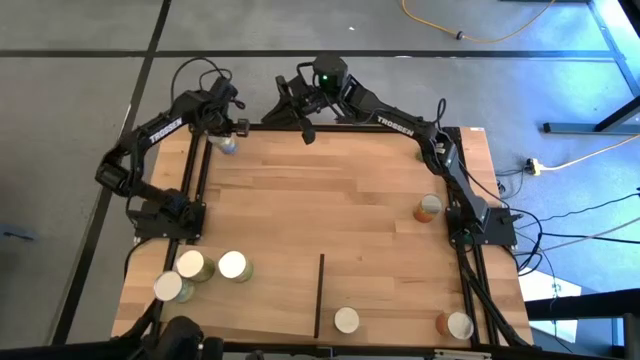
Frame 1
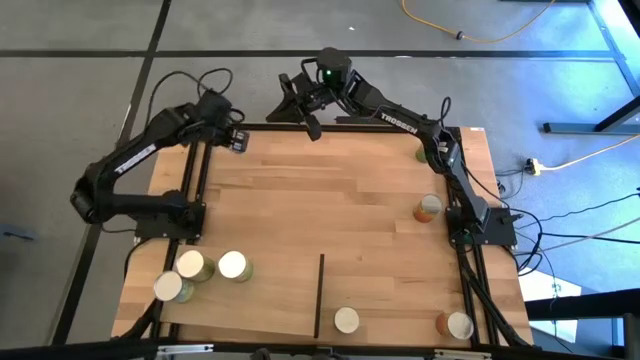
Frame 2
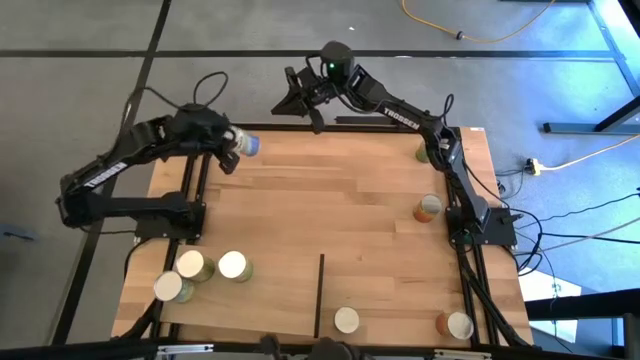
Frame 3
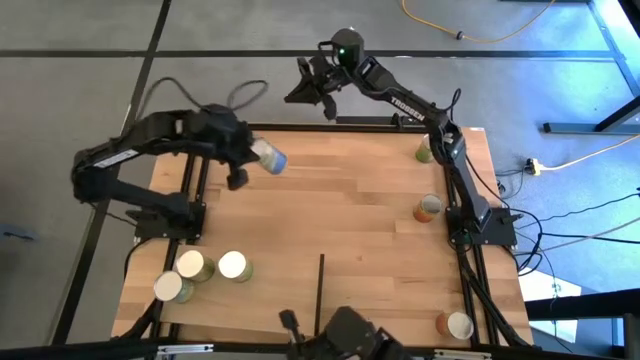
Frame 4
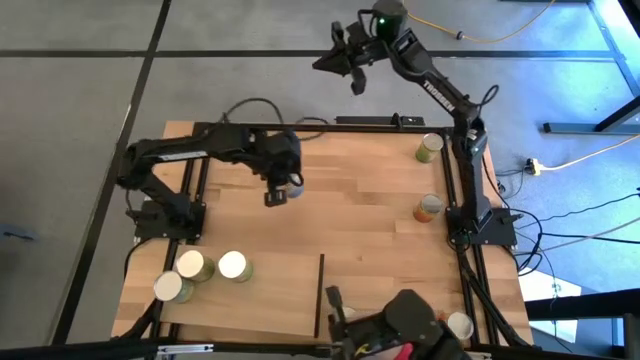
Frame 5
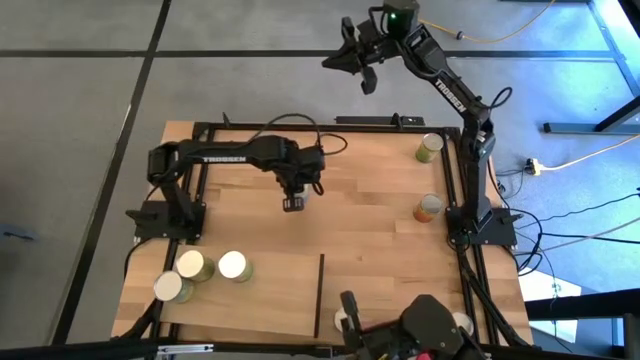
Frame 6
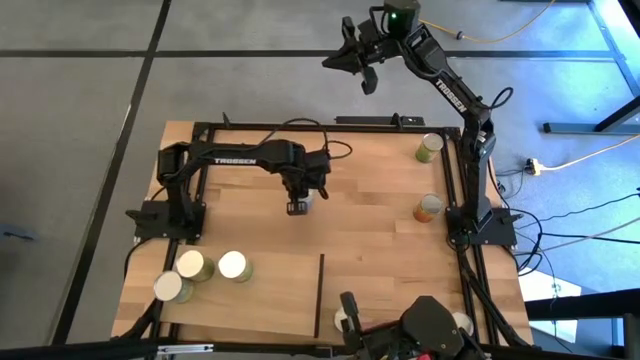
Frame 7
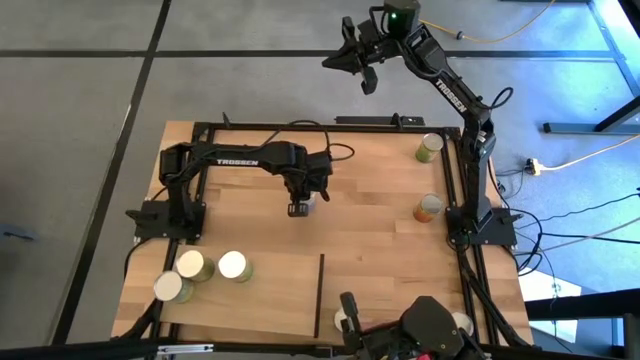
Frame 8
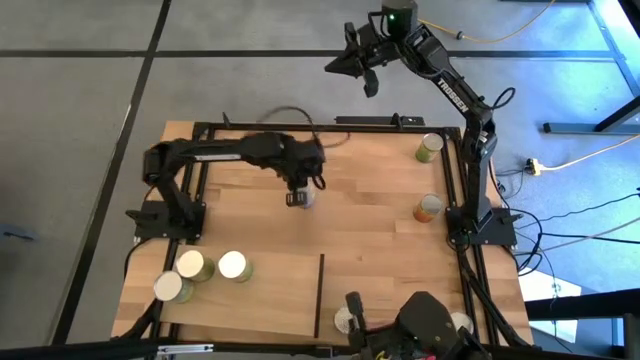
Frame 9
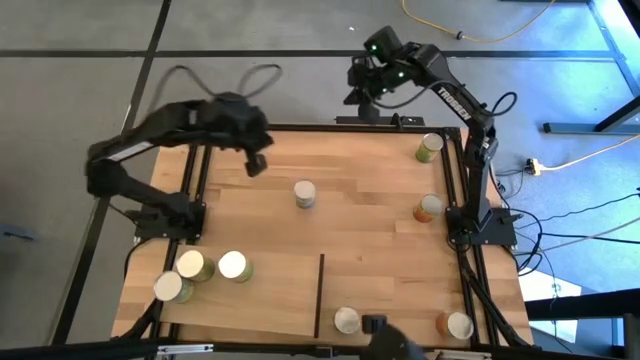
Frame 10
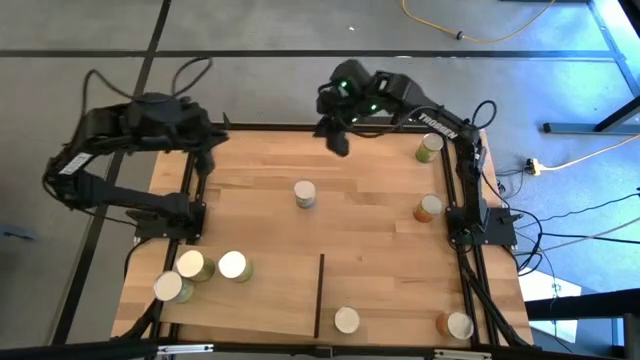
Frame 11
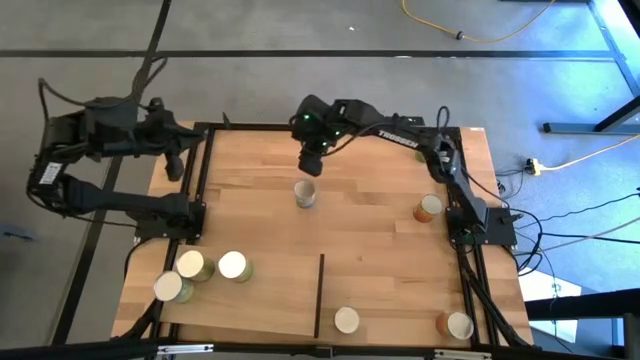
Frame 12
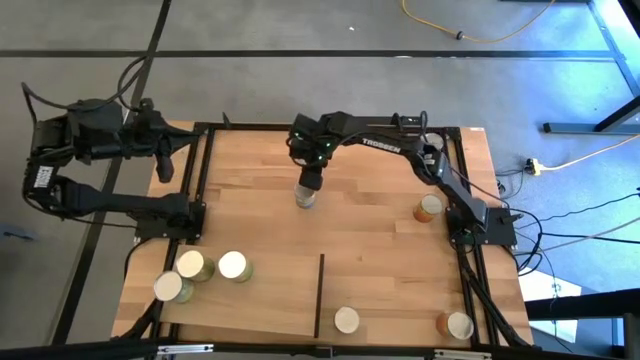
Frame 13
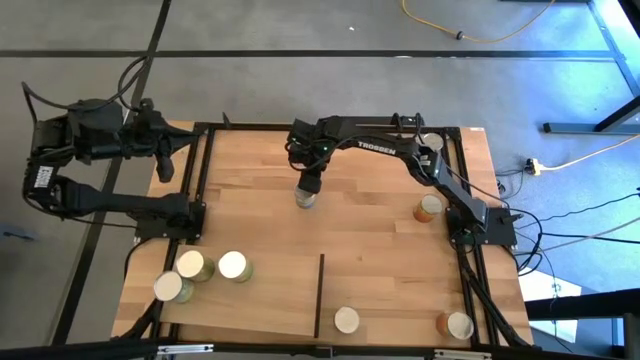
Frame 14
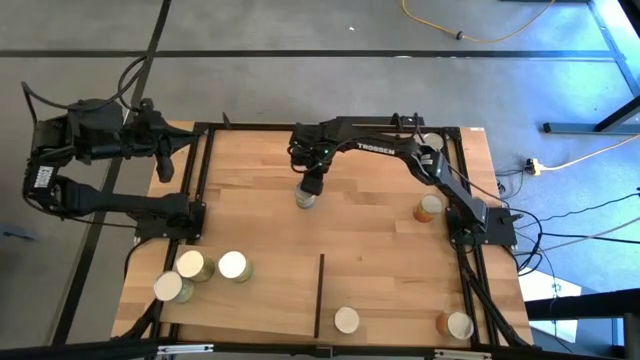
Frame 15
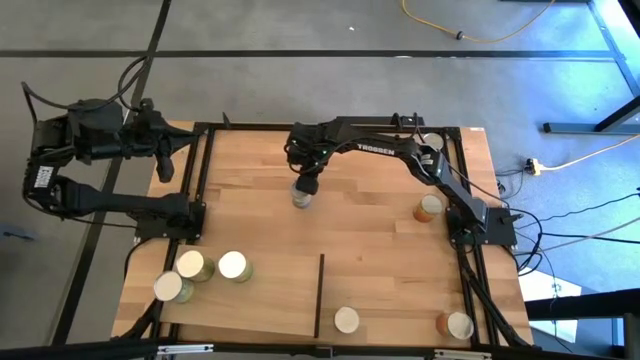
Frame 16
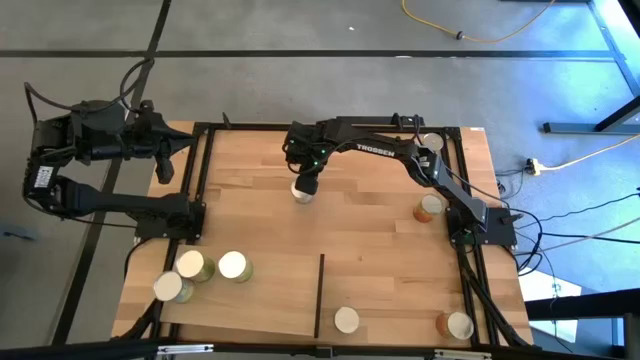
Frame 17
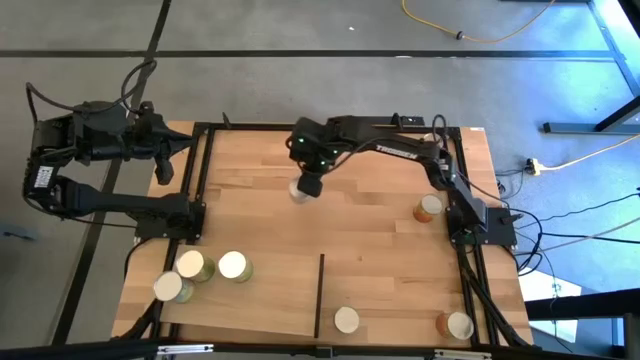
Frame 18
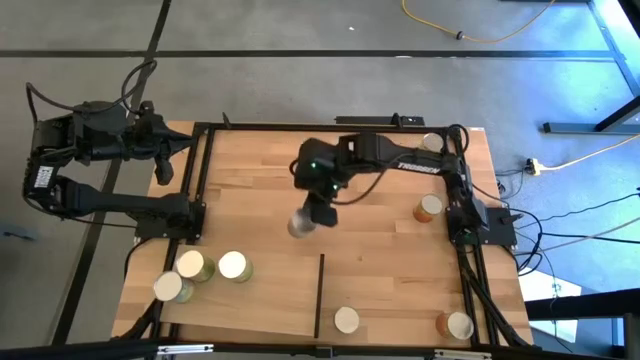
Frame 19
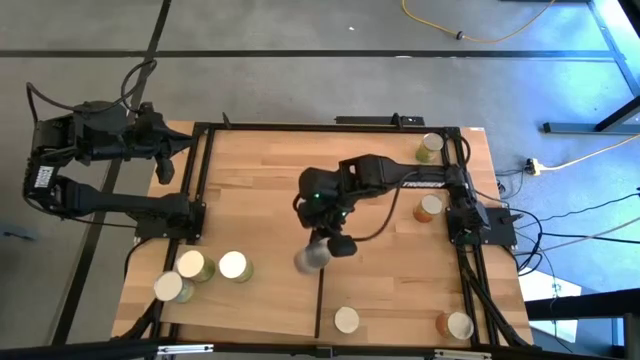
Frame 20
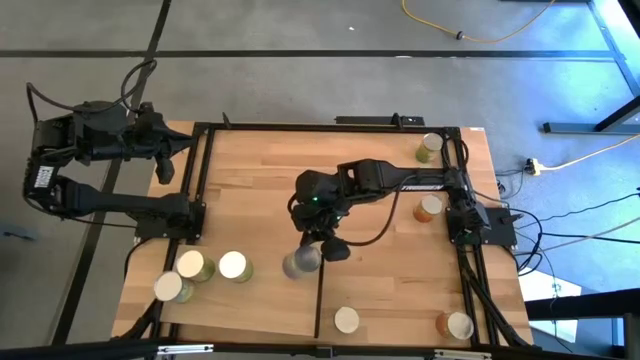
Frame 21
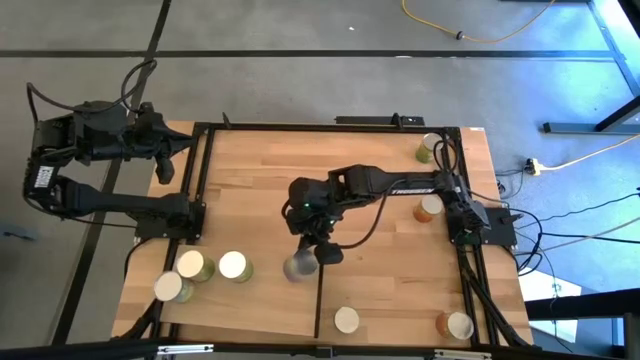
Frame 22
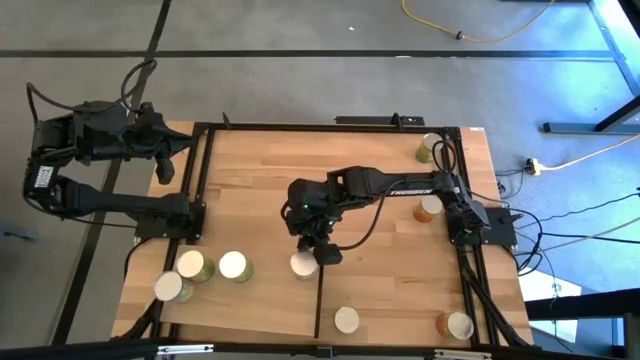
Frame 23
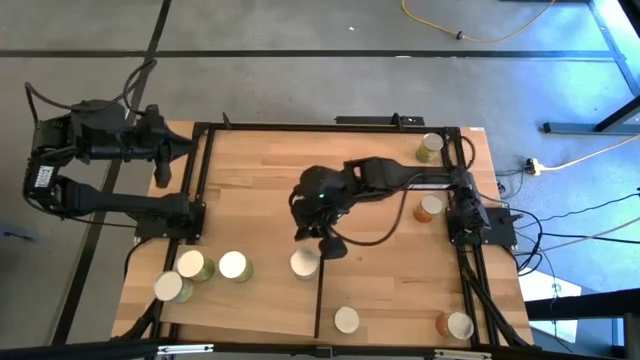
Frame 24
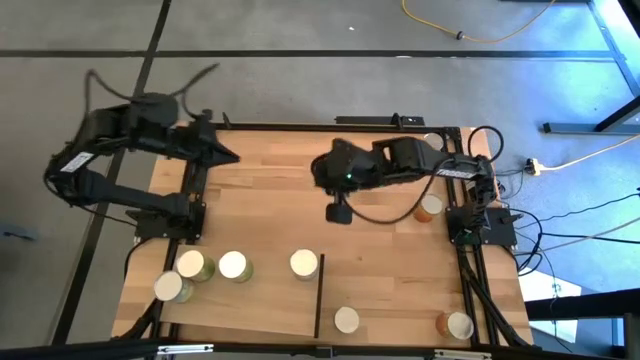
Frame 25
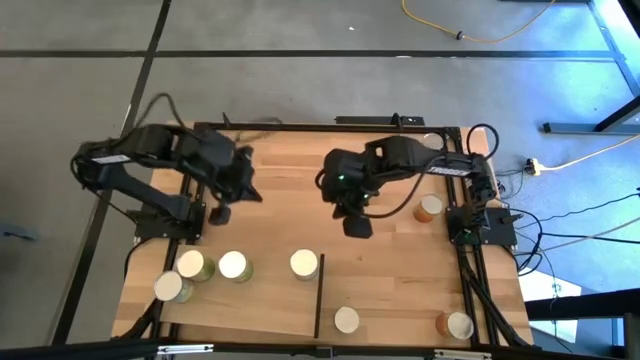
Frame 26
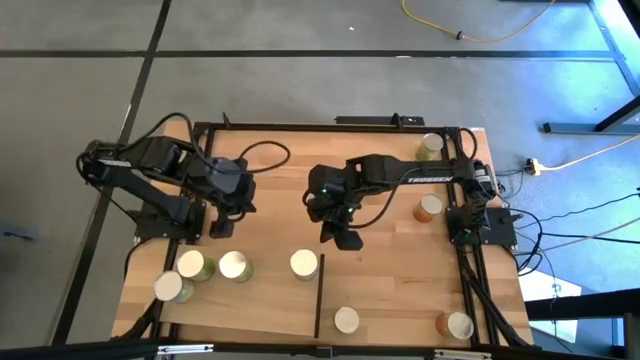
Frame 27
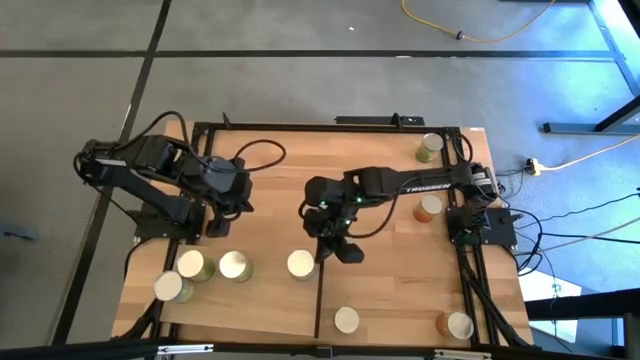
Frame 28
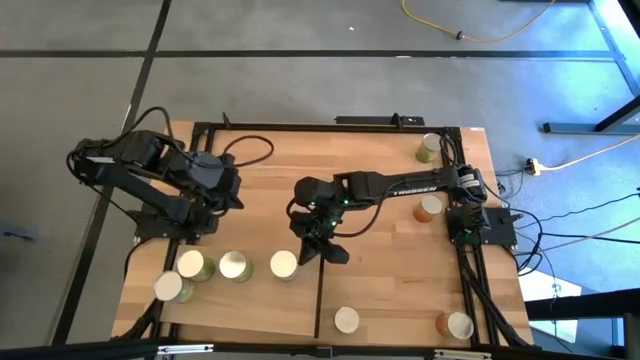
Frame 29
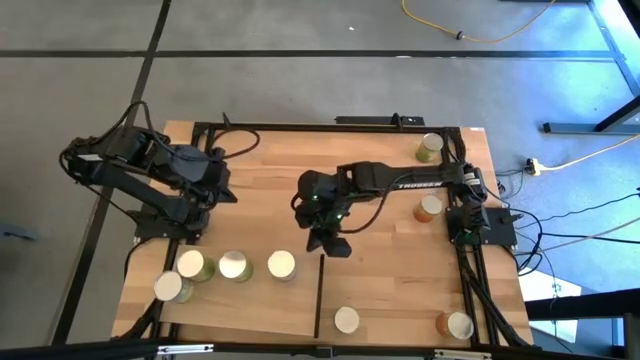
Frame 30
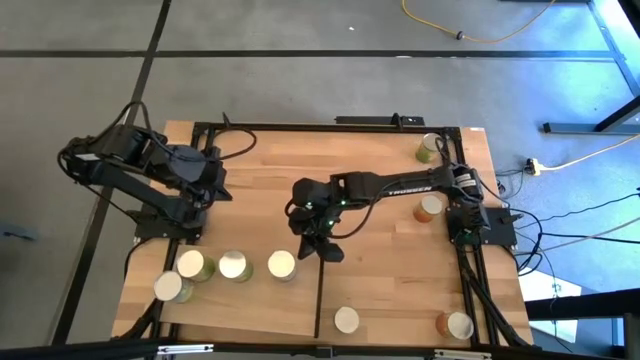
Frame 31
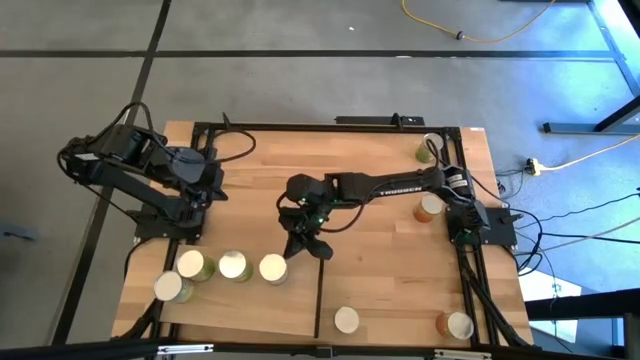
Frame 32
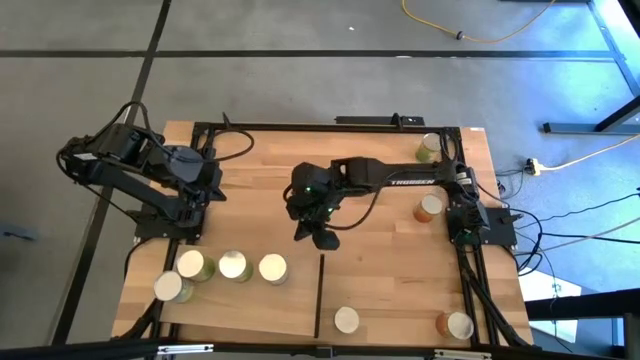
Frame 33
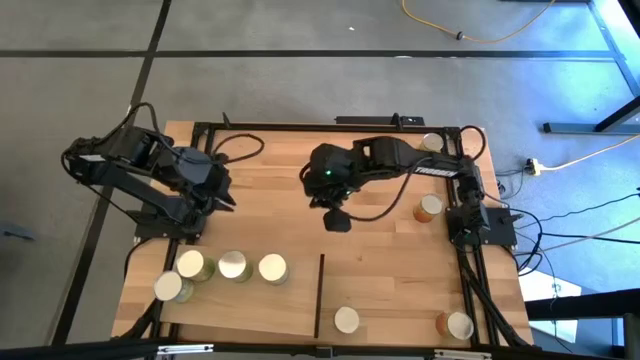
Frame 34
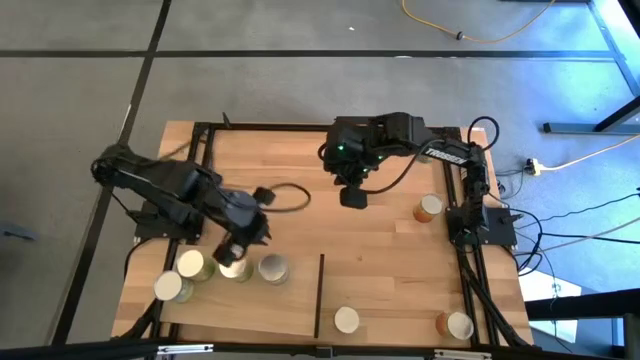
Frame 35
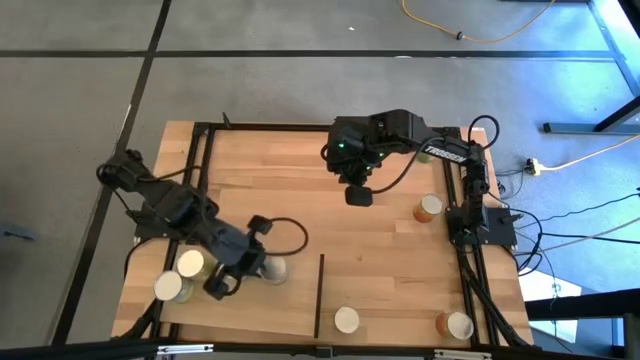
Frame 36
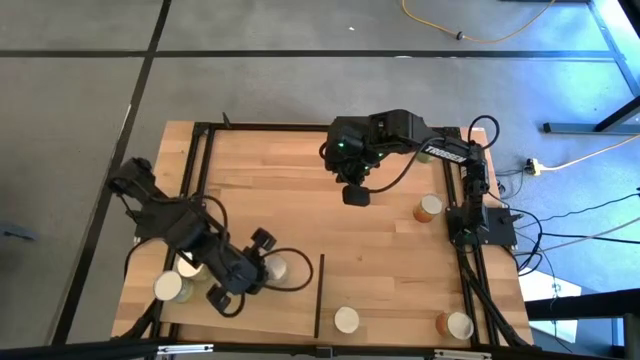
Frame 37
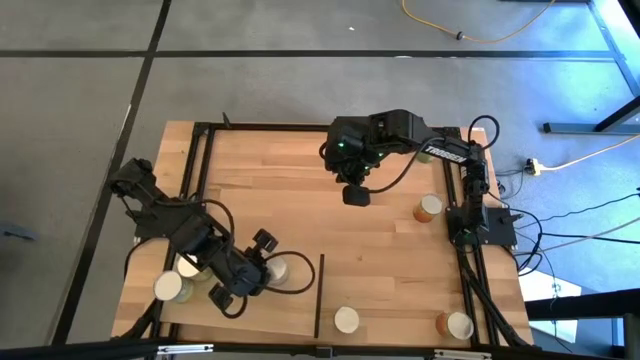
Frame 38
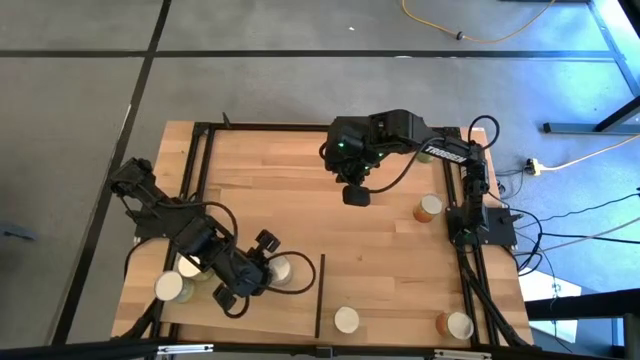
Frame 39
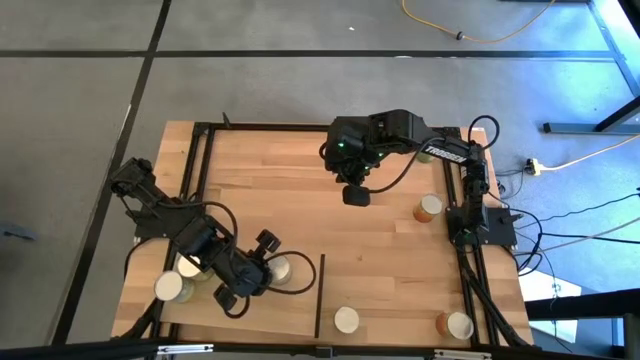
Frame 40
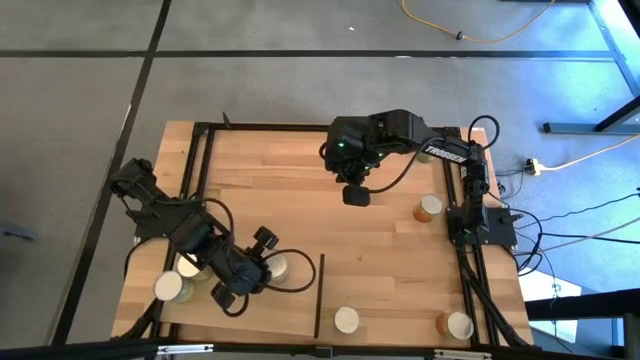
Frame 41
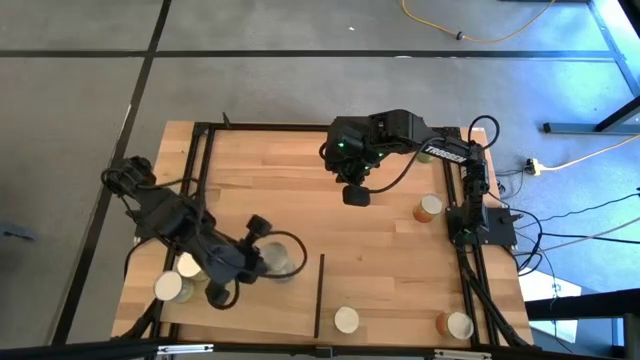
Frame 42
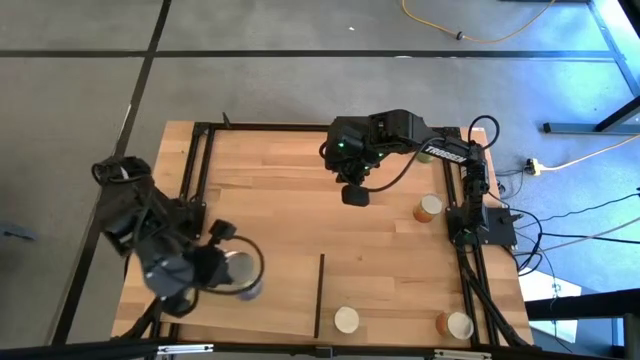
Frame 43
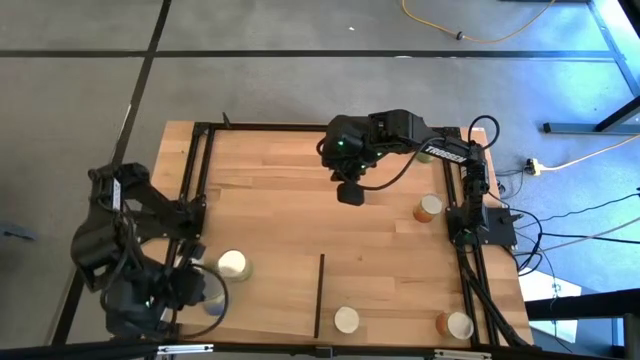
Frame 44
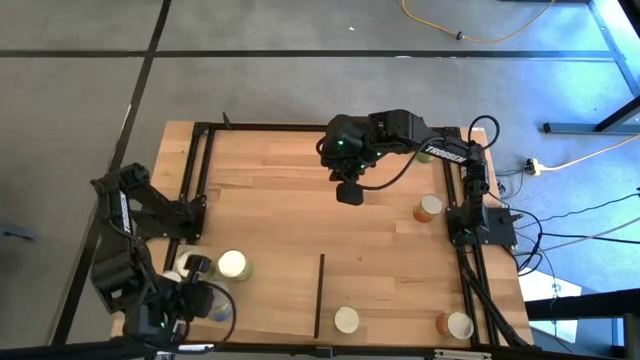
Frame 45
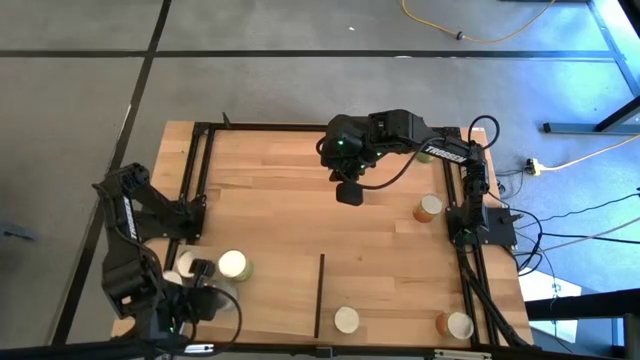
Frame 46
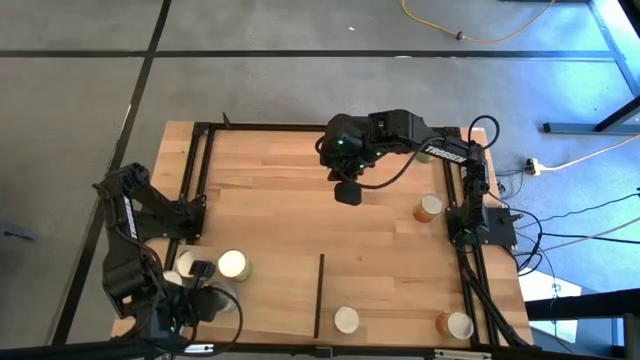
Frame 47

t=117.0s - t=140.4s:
Task: Pick and place cans onto a shelf
Put the canned peas on the shelf
